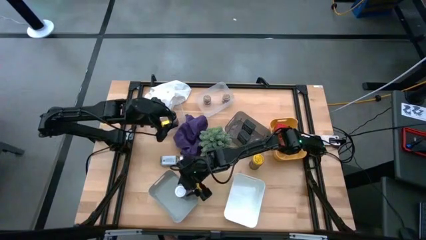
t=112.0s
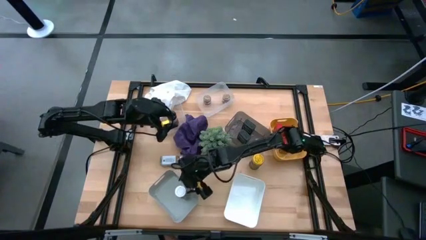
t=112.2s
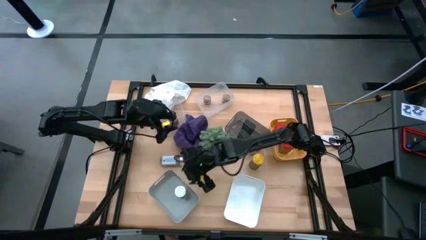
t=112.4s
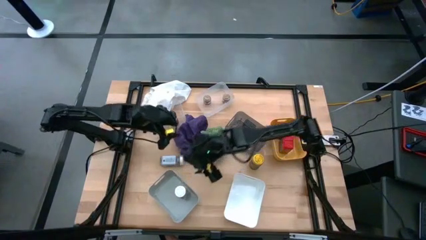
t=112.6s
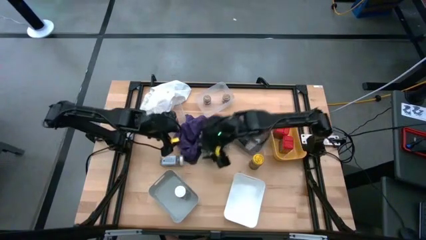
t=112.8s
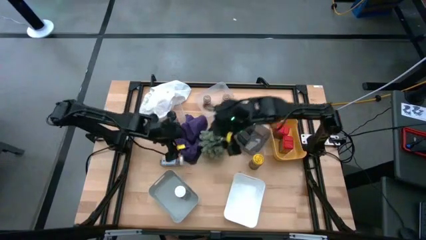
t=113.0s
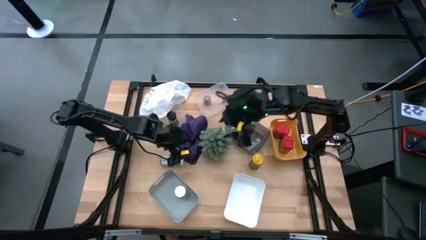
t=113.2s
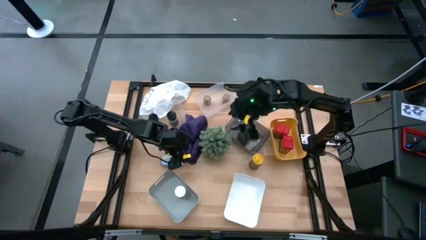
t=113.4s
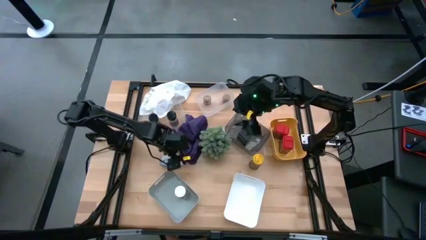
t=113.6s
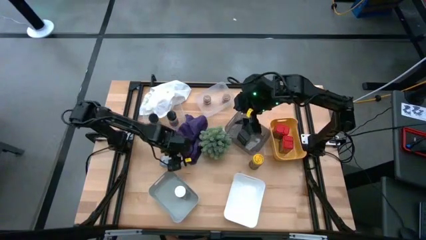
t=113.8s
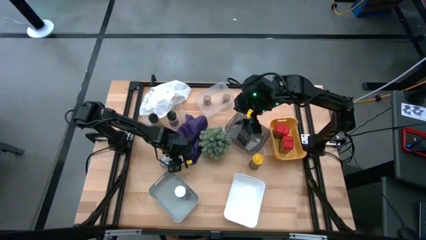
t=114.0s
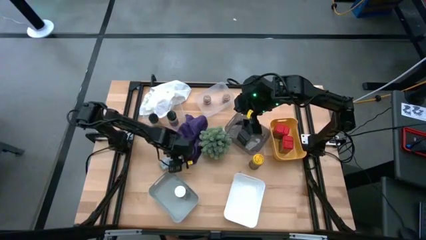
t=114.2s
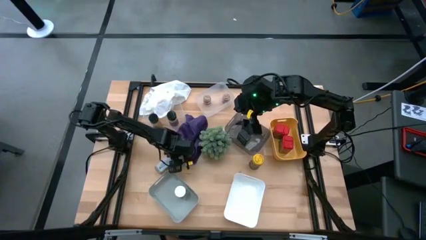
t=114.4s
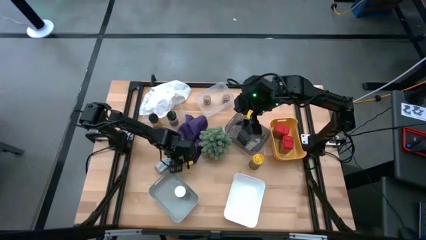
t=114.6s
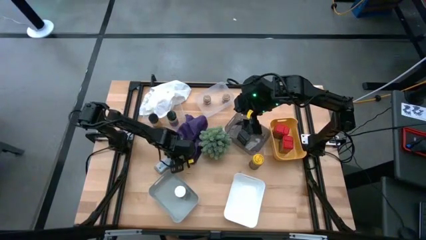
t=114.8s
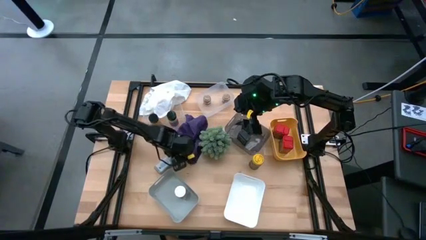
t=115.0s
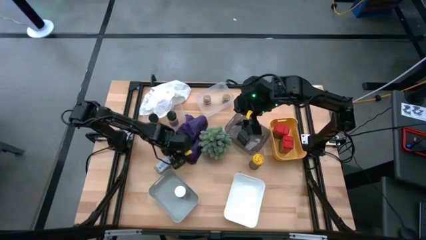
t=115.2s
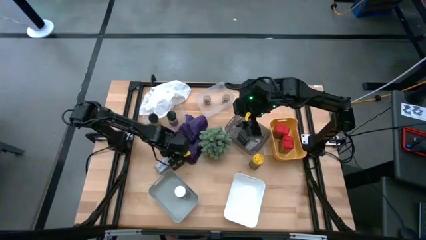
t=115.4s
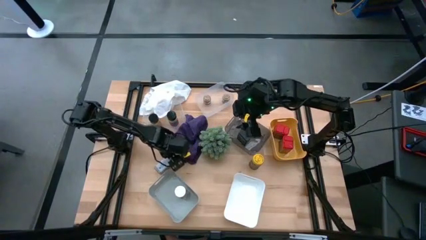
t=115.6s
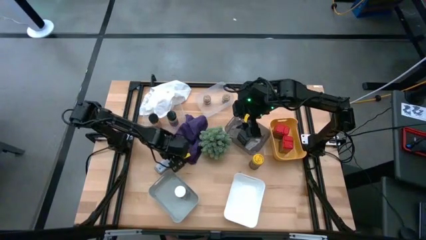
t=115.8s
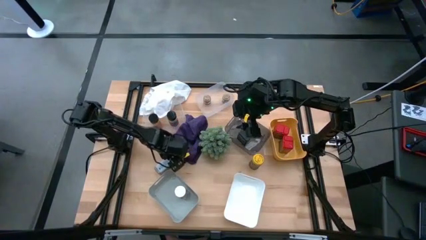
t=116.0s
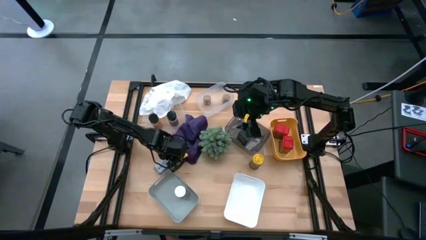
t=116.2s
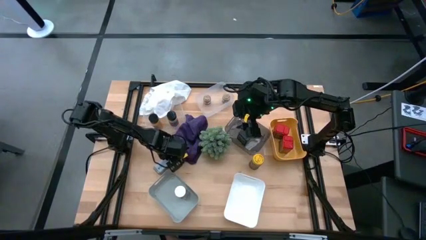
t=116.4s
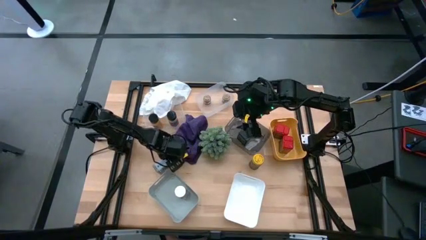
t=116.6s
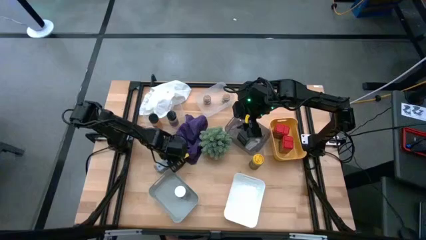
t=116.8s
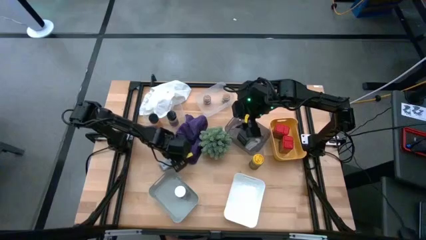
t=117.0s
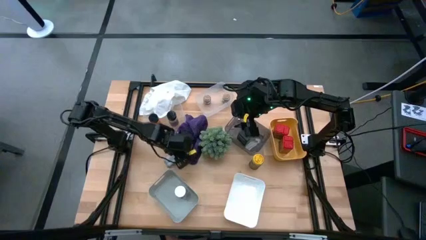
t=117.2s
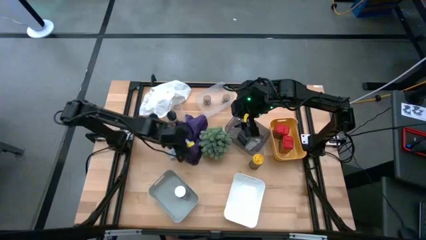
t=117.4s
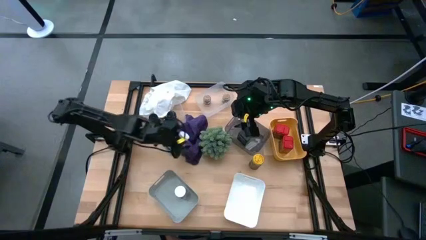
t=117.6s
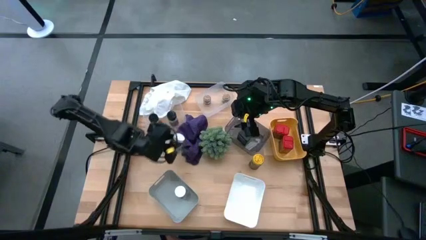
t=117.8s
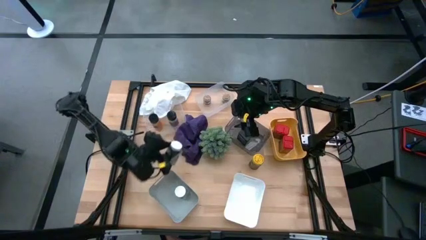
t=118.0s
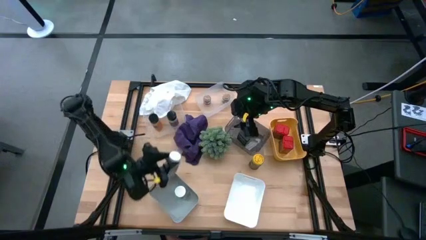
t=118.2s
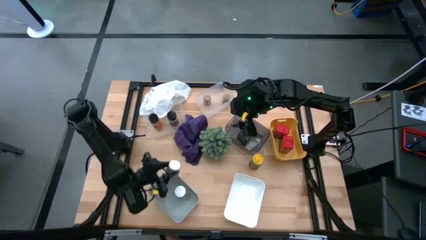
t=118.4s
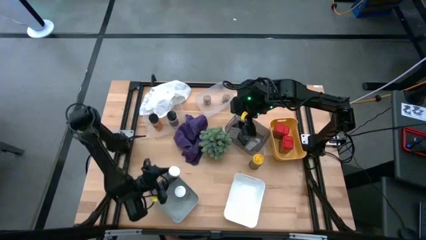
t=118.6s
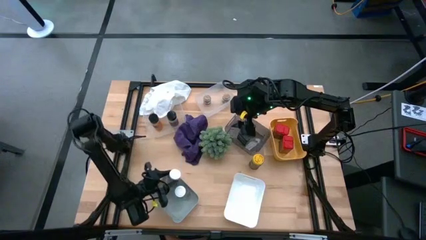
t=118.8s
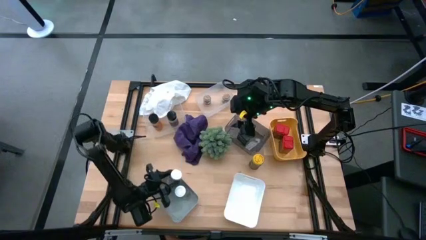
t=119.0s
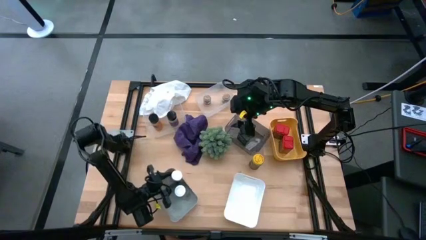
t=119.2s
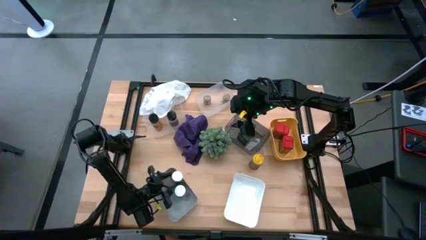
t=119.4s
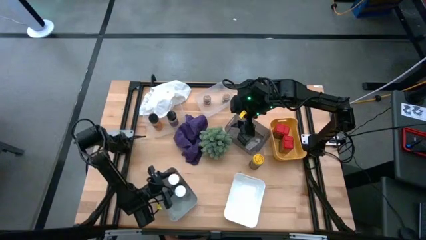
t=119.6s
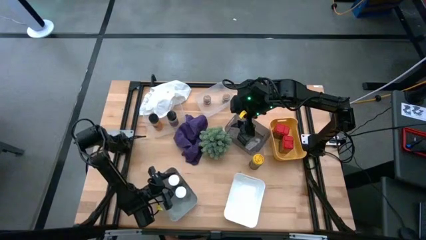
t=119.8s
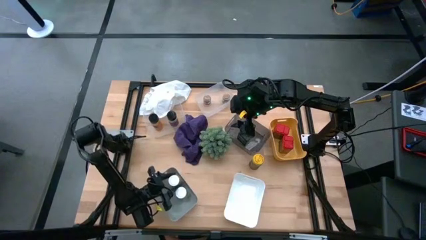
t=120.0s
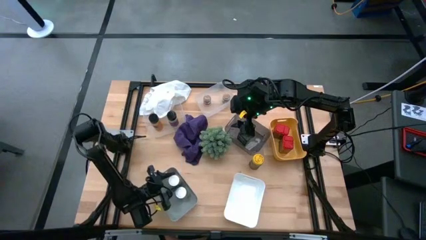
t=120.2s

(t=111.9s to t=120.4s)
Task: Sort spices by type
Put the white seasoning bottle into the gray bin

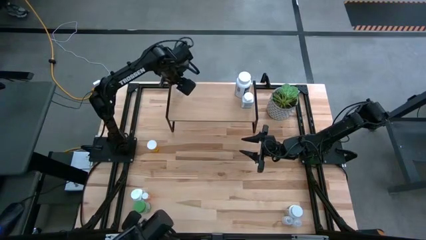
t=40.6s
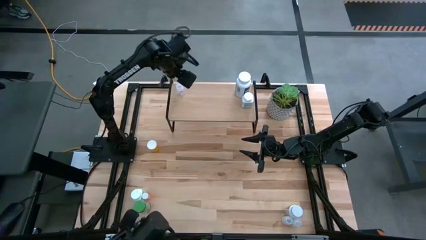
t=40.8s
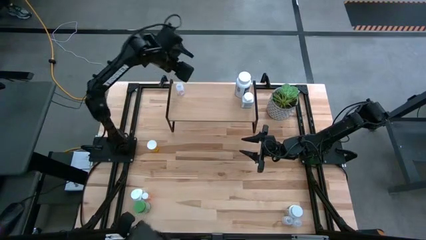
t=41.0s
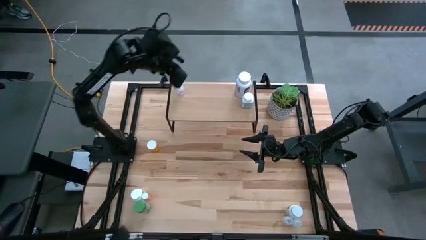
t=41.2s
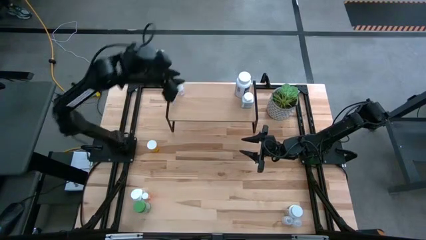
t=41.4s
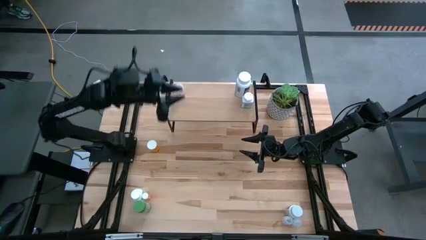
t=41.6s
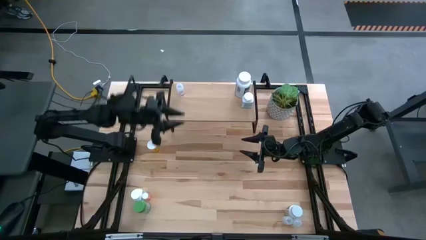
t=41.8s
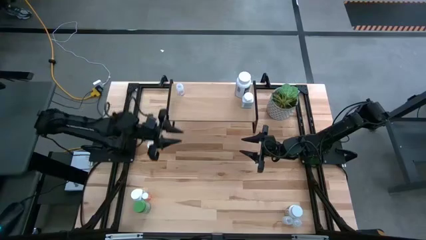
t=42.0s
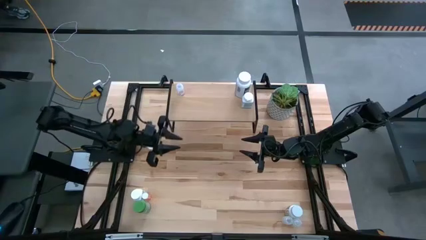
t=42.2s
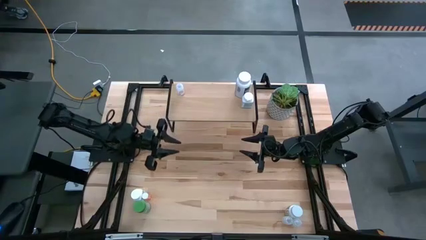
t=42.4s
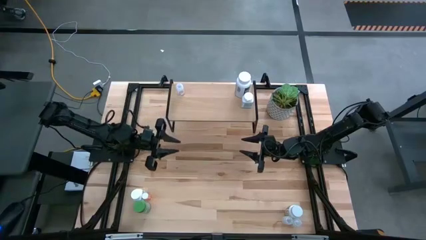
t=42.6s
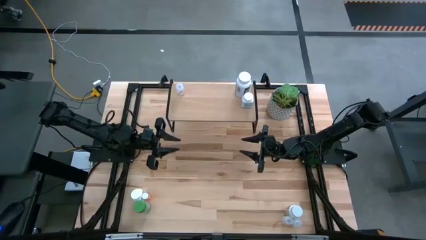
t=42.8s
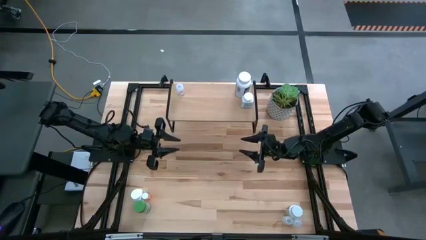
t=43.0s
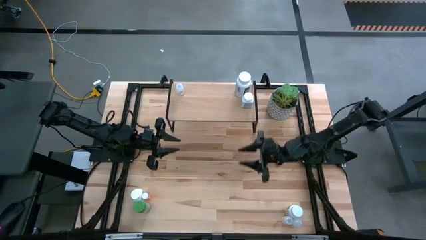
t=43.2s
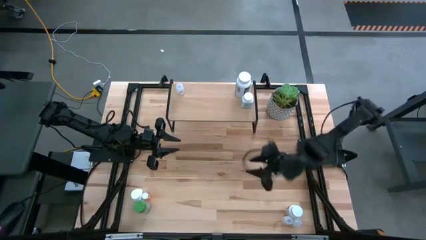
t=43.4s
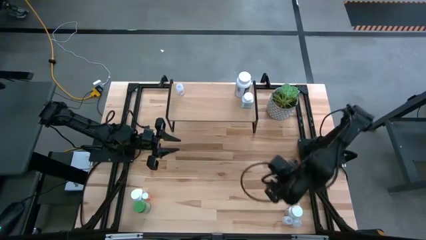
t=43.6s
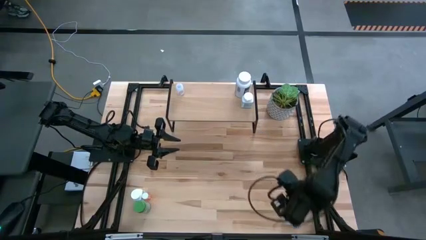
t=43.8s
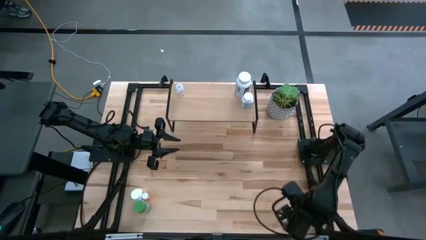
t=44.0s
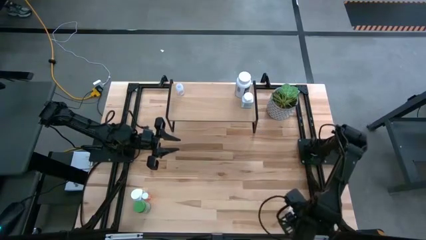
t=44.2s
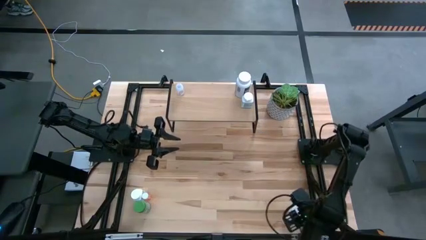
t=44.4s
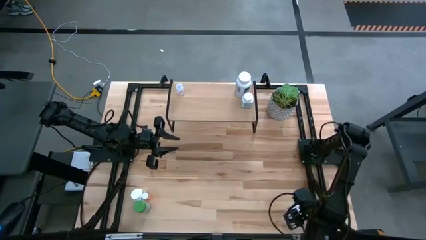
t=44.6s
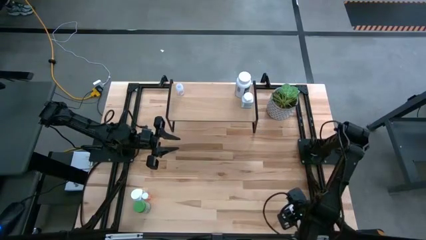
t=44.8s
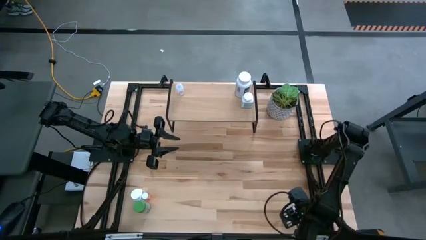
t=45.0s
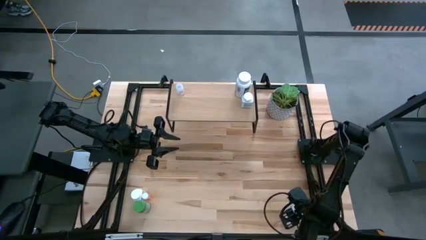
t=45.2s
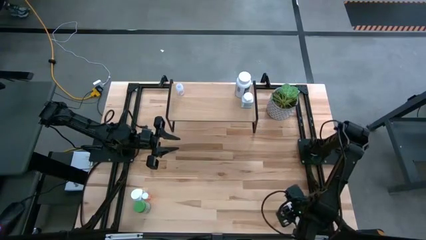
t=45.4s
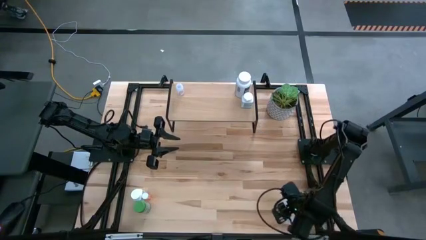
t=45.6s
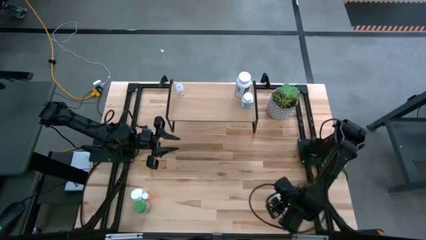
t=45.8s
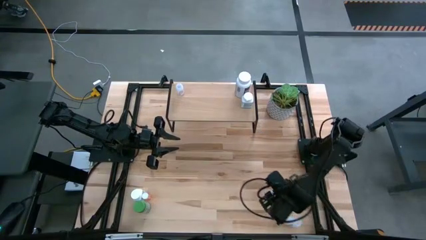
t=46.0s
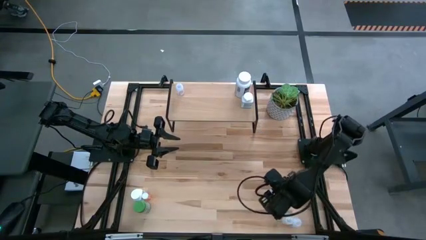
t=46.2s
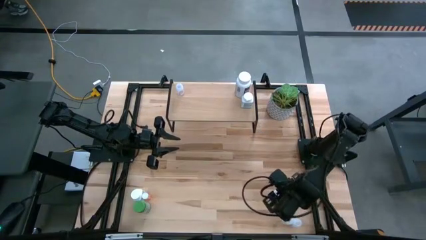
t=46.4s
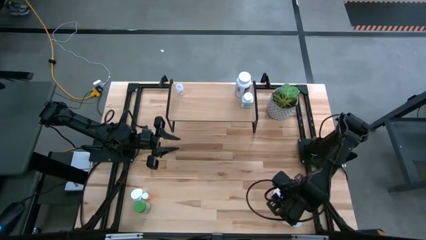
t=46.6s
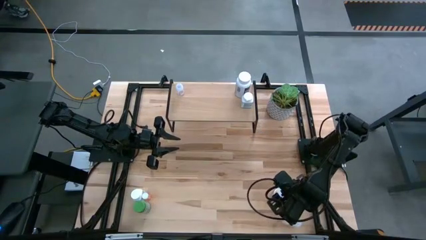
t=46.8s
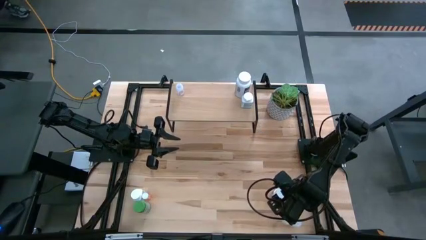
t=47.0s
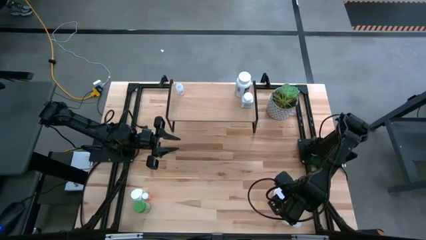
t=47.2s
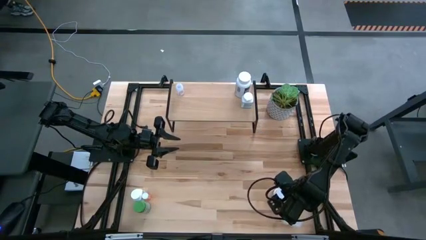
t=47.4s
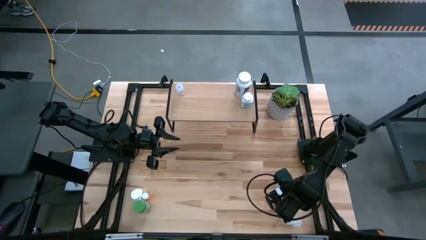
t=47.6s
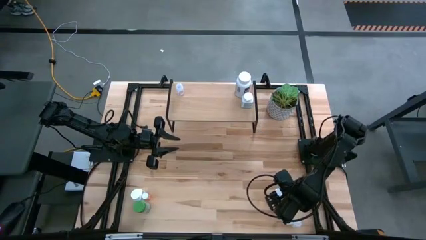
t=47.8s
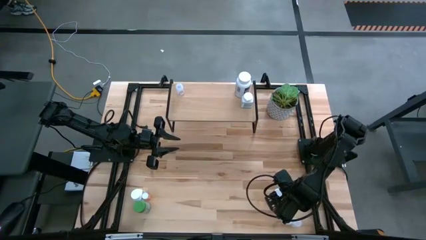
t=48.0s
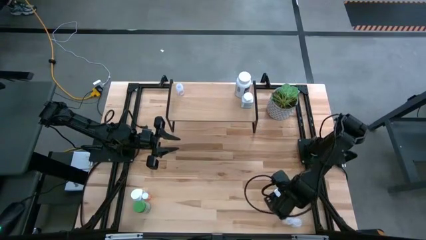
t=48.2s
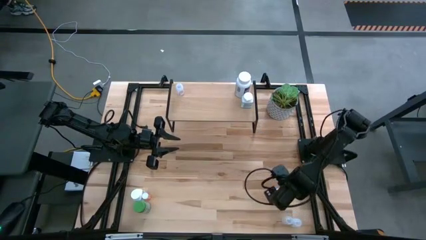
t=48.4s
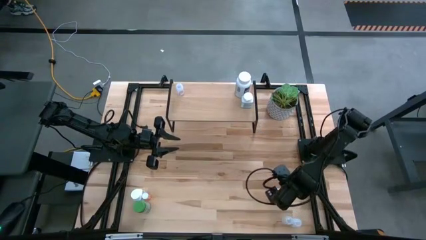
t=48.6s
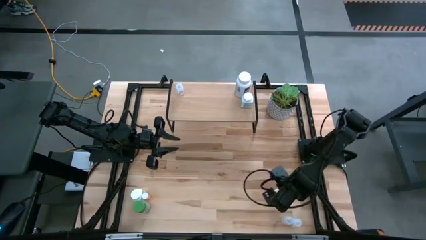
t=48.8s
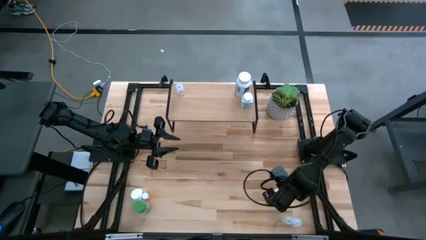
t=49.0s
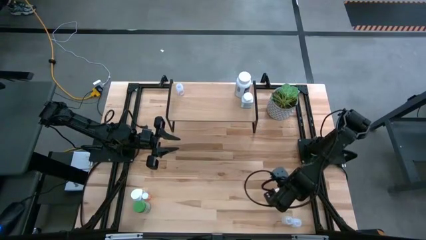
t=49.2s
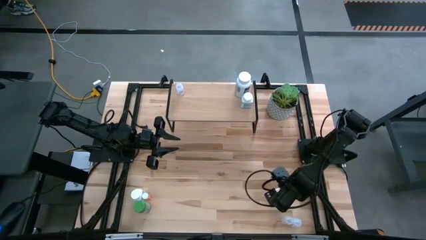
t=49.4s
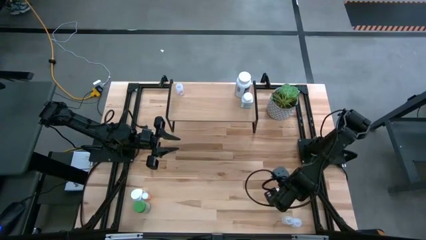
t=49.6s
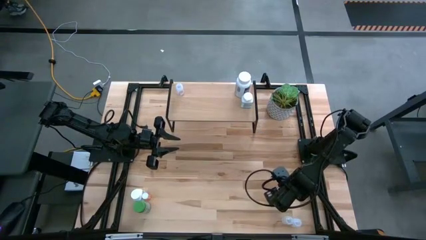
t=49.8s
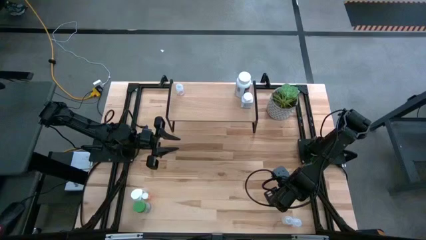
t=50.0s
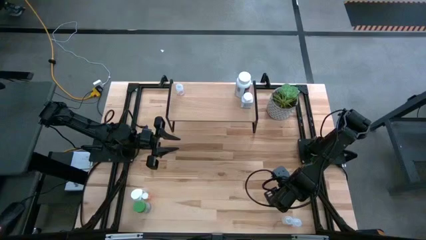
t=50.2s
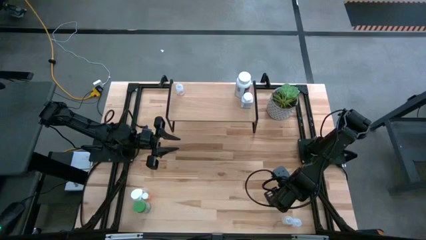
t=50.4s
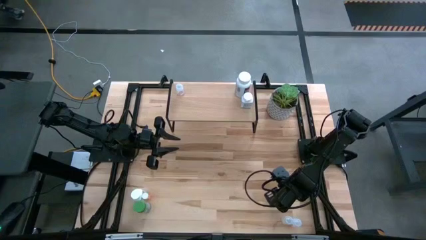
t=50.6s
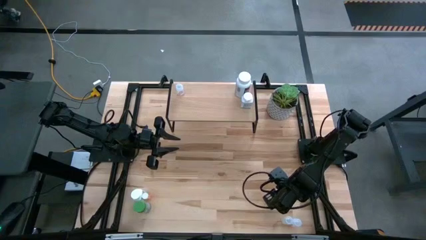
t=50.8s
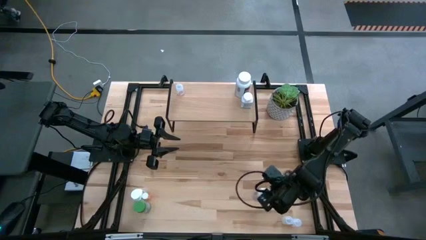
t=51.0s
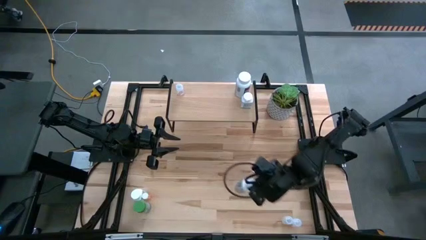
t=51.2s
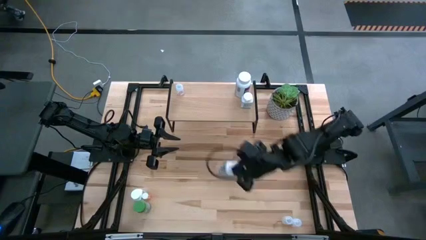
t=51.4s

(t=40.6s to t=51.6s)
Task: Pick and place medicine bottles onto shelf by color
Put the right white pill bottle on the shelf
